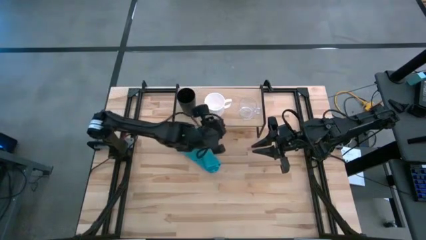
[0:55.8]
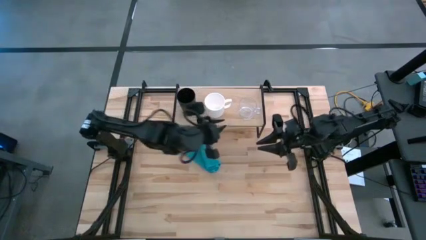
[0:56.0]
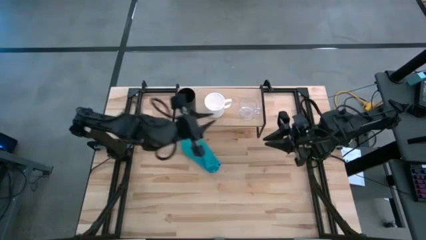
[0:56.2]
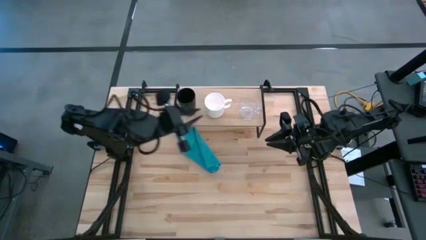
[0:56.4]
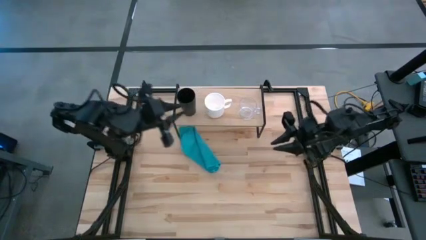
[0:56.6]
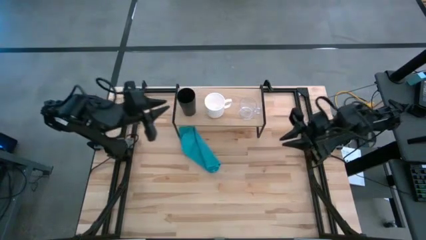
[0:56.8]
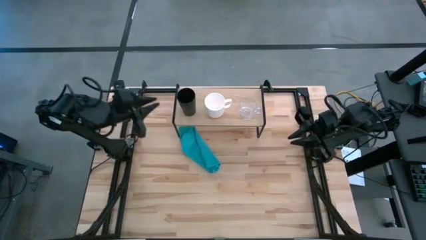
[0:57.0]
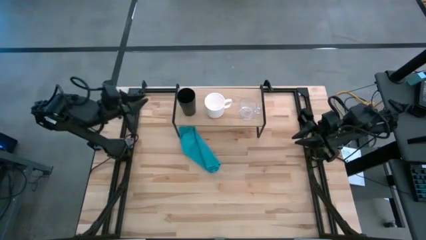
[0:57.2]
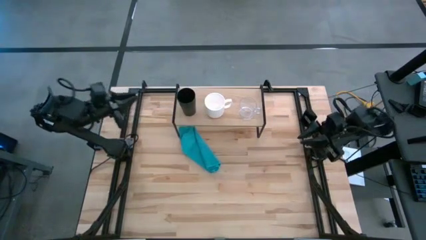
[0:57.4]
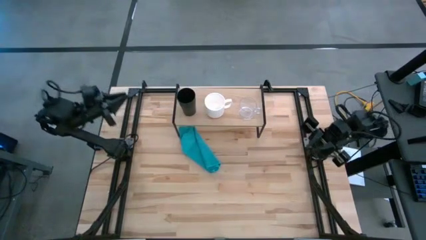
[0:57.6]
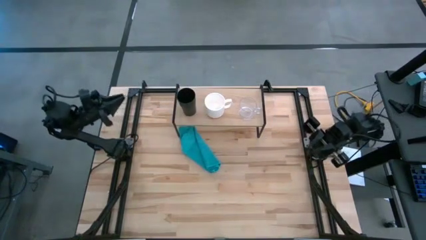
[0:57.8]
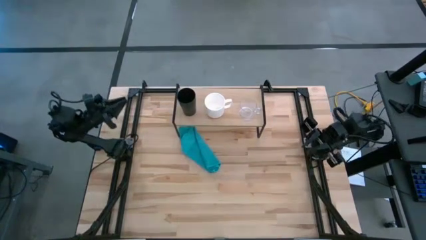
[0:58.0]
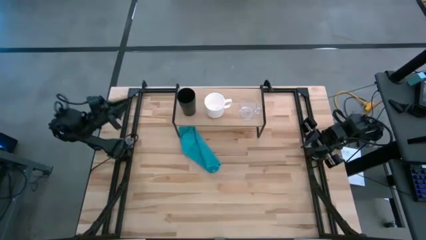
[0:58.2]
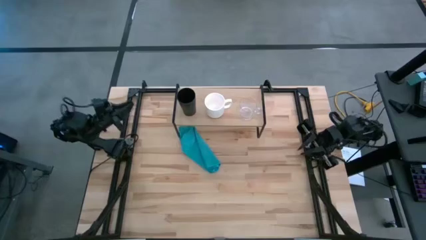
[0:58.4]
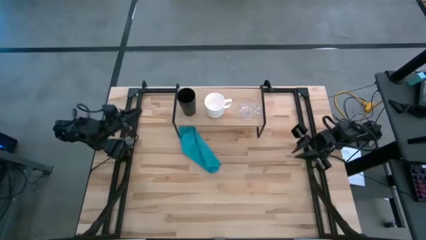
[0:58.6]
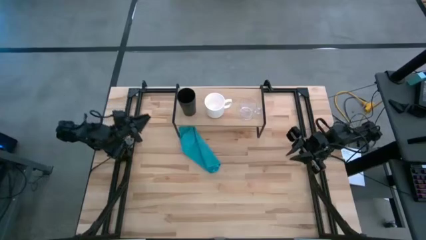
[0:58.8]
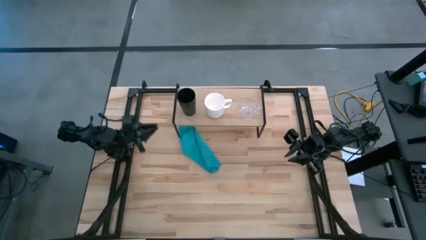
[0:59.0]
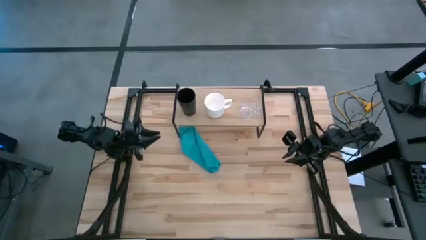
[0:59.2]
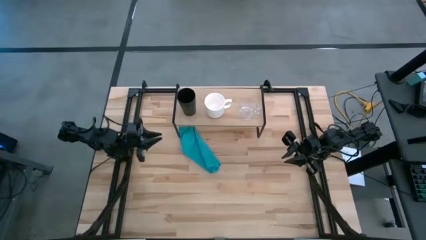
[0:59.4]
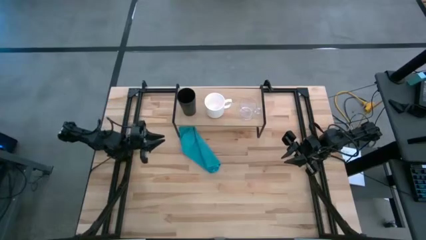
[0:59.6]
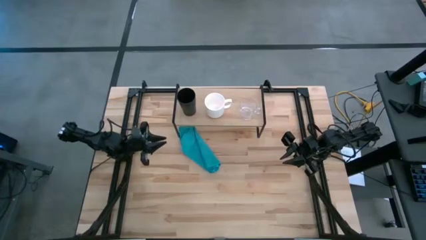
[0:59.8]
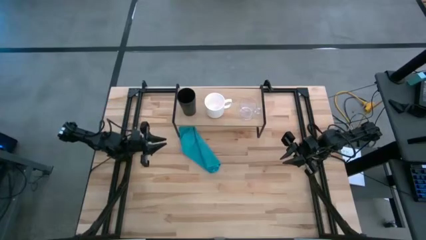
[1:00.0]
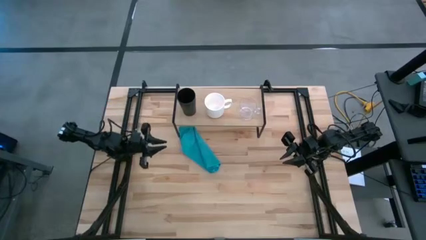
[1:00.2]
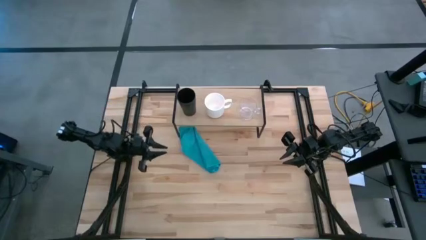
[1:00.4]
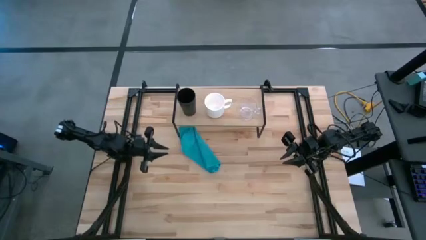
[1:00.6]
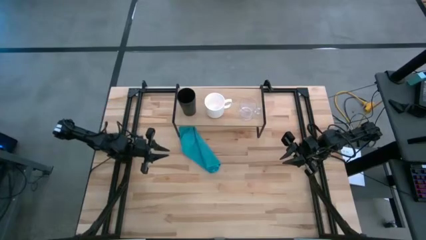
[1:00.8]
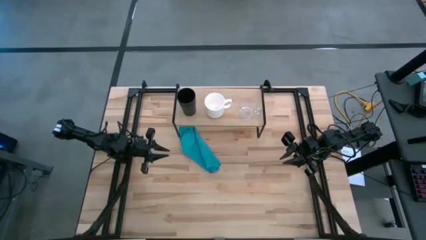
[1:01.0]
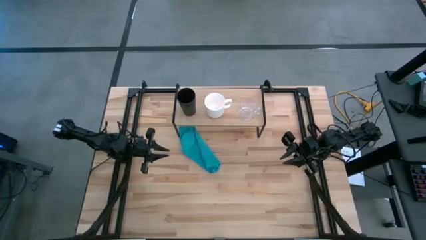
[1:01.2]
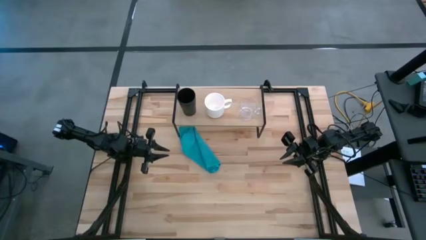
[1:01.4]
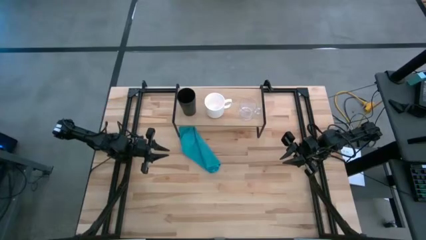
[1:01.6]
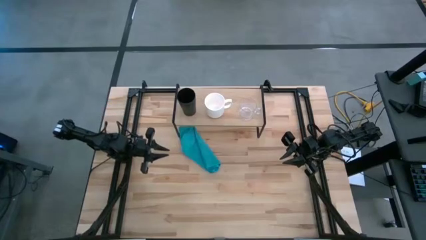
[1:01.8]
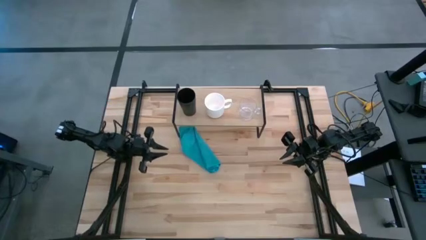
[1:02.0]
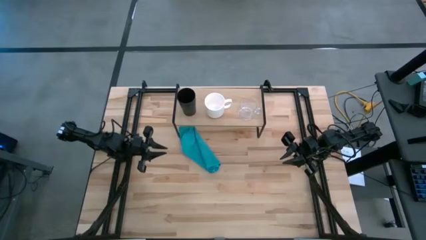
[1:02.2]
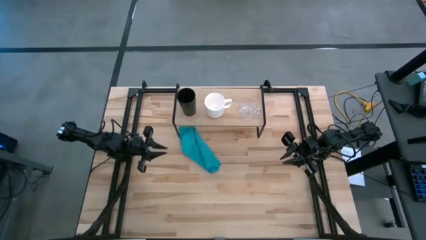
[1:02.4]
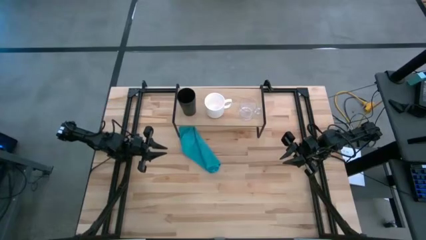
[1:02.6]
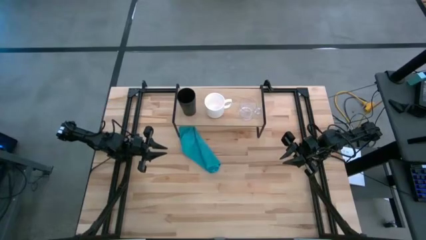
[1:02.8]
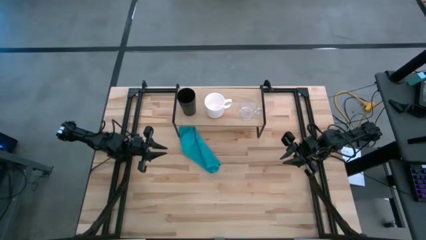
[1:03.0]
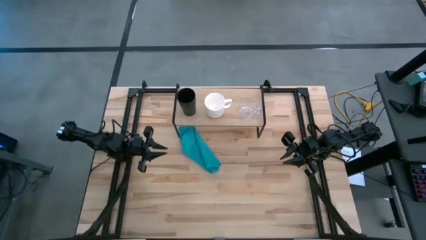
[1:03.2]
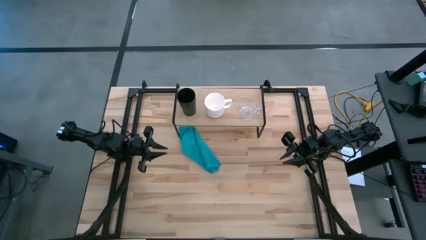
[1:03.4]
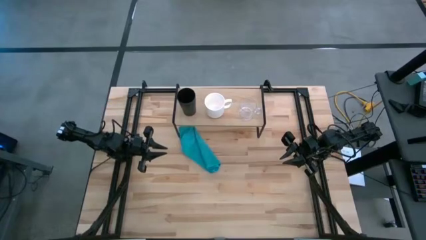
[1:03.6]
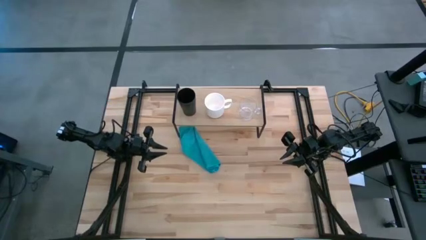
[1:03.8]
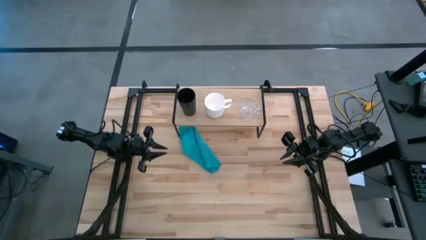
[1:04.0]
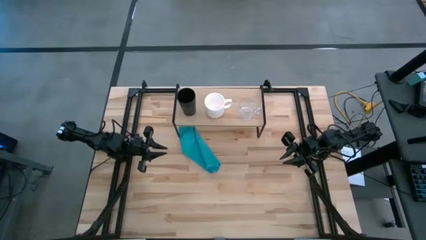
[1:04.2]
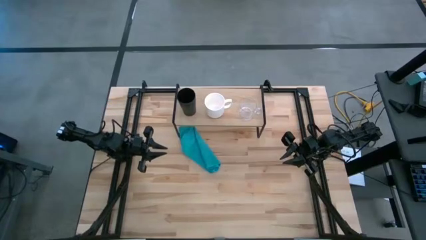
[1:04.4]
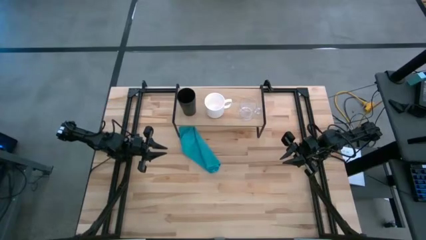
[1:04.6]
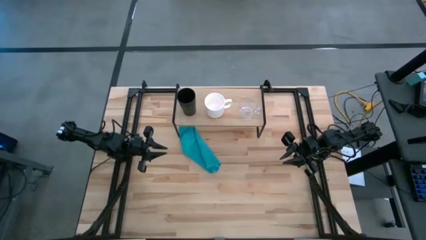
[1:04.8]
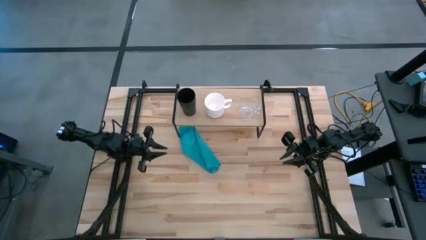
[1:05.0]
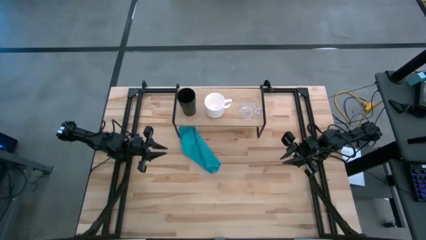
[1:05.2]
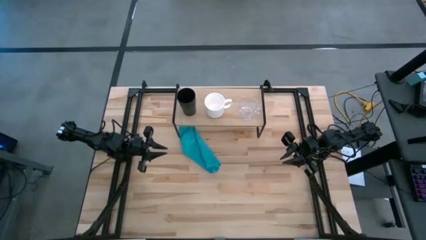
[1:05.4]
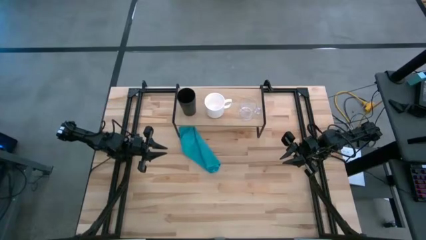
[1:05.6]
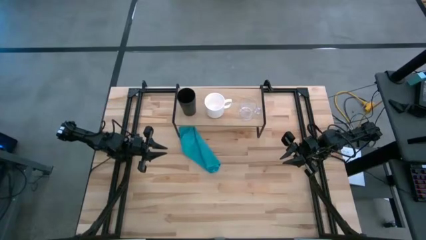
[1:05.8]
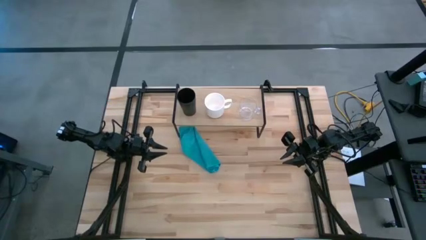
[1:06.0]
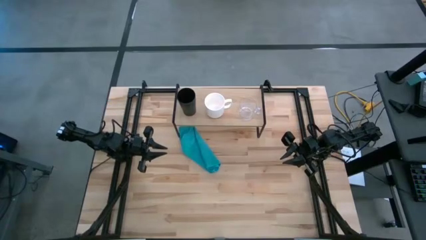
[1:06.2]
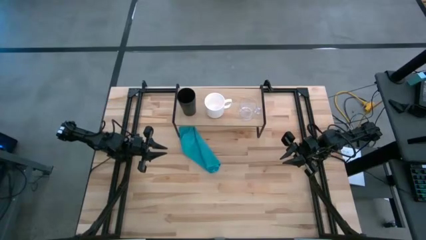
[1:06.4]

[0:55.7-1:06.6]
Task: Stack small to large cups/mugs on shelf
Return to Home Position

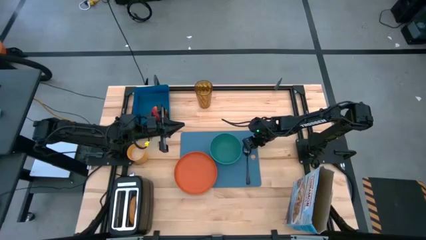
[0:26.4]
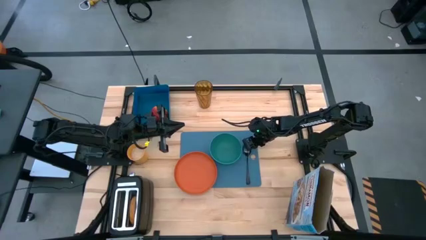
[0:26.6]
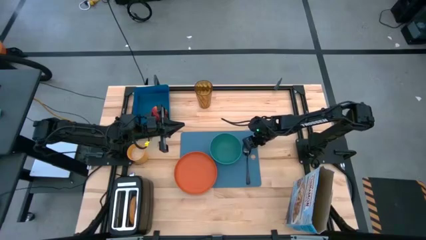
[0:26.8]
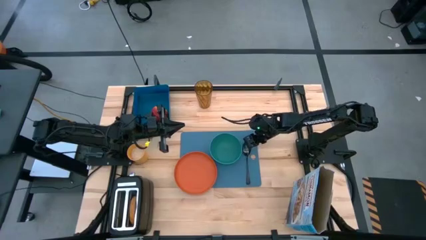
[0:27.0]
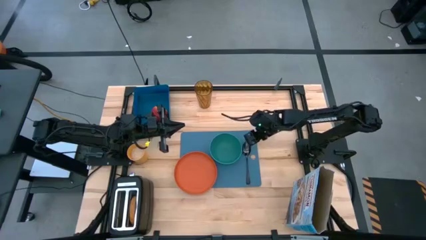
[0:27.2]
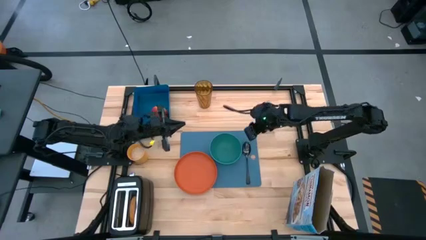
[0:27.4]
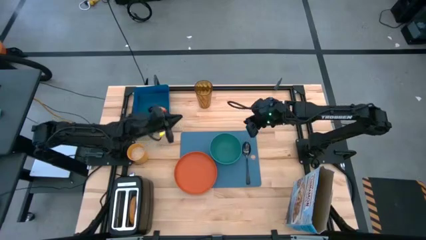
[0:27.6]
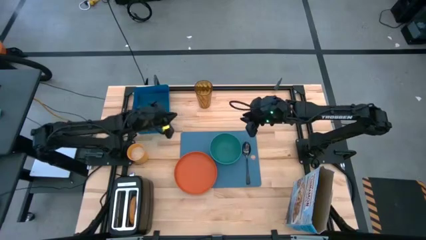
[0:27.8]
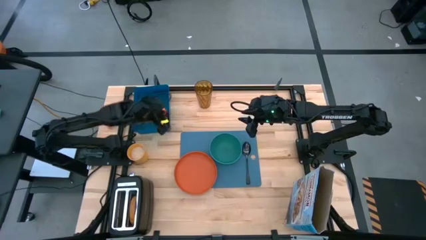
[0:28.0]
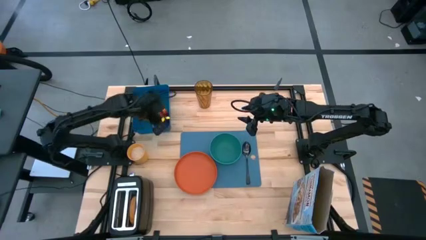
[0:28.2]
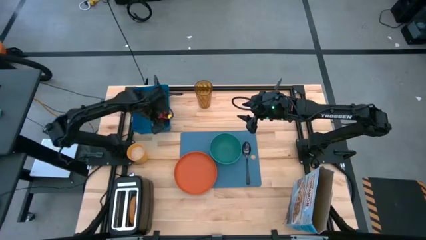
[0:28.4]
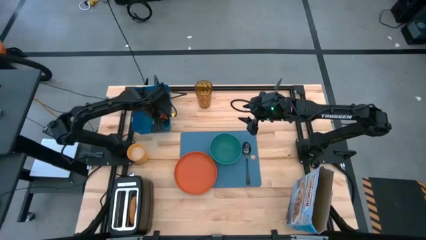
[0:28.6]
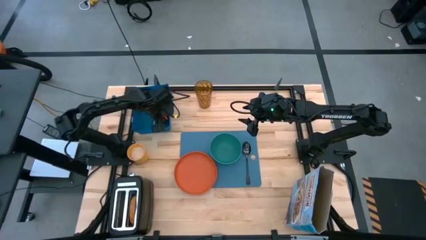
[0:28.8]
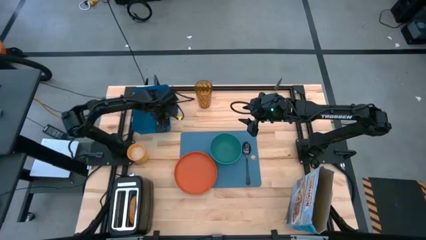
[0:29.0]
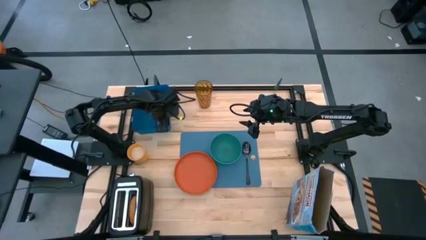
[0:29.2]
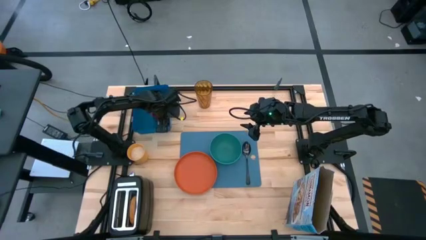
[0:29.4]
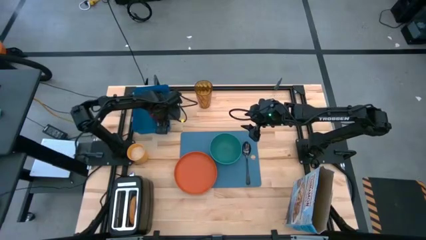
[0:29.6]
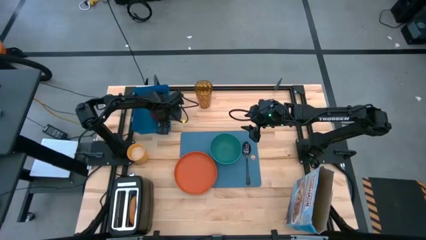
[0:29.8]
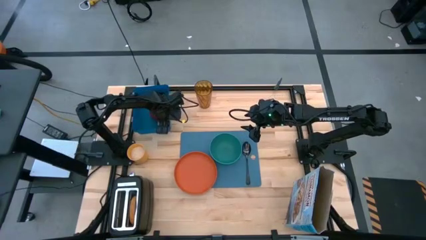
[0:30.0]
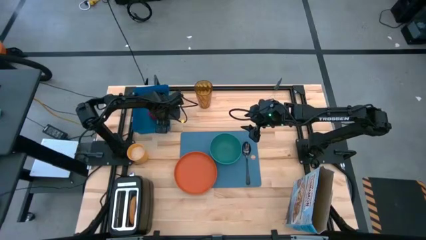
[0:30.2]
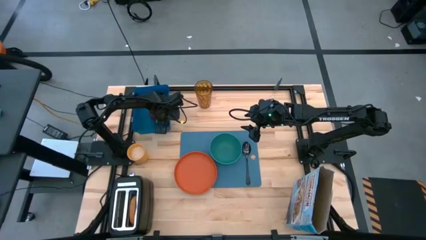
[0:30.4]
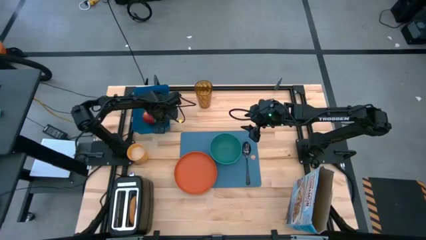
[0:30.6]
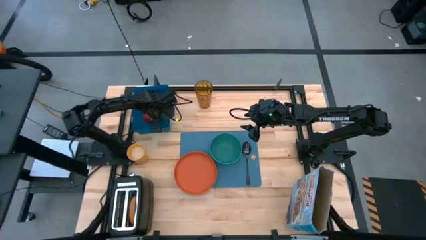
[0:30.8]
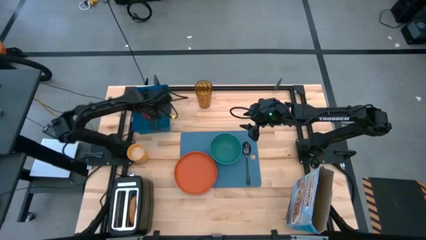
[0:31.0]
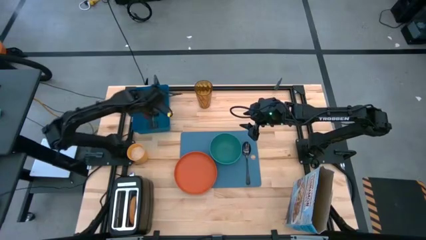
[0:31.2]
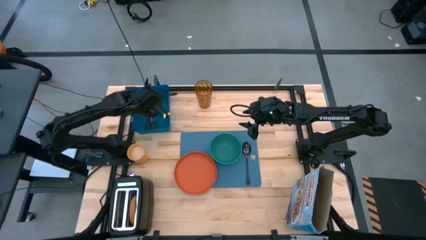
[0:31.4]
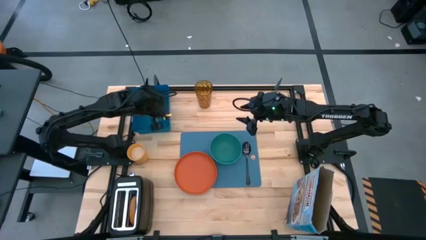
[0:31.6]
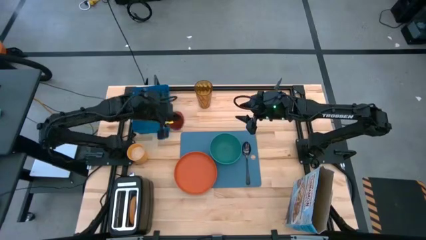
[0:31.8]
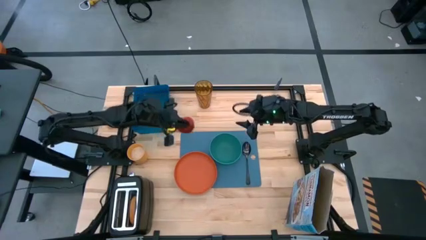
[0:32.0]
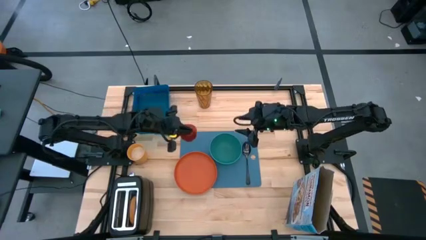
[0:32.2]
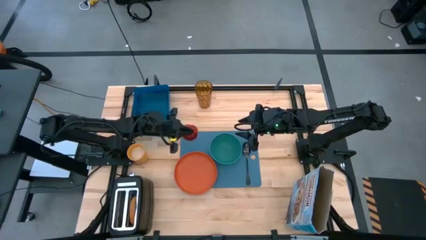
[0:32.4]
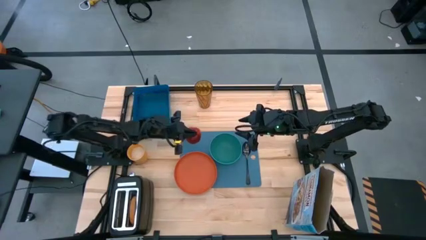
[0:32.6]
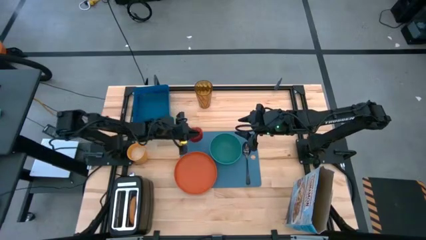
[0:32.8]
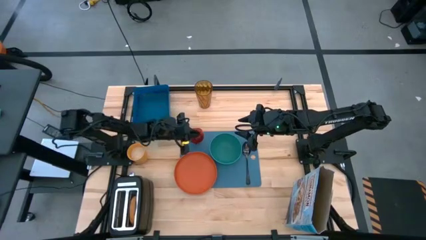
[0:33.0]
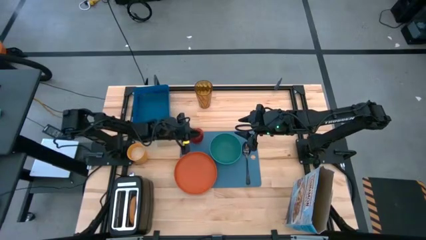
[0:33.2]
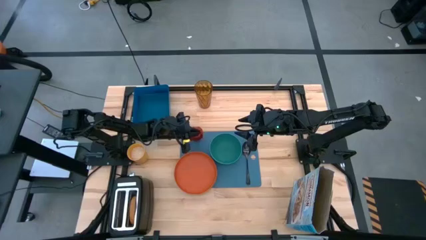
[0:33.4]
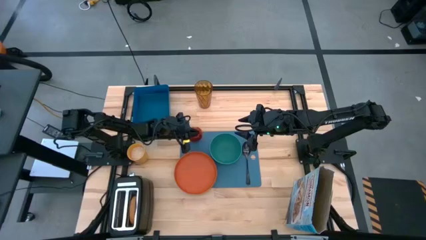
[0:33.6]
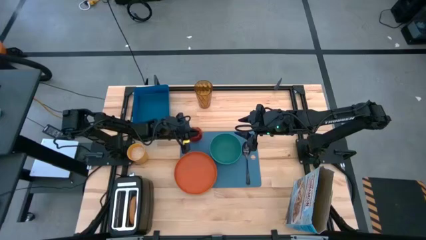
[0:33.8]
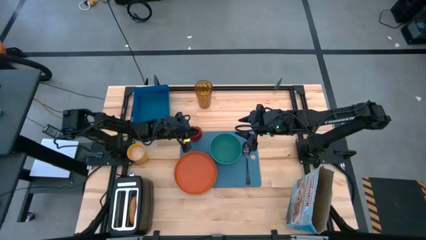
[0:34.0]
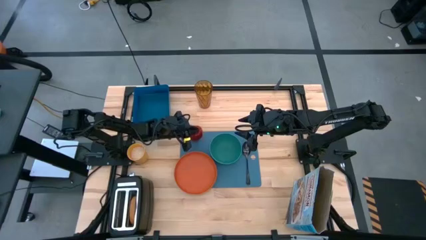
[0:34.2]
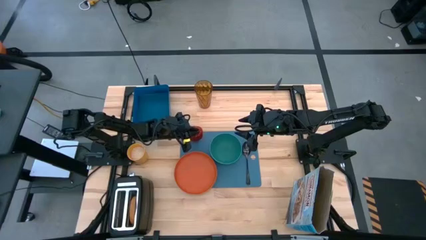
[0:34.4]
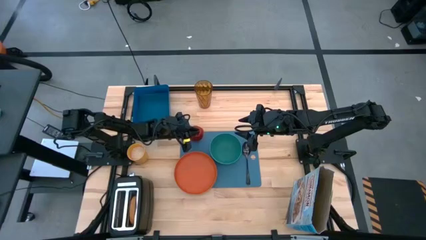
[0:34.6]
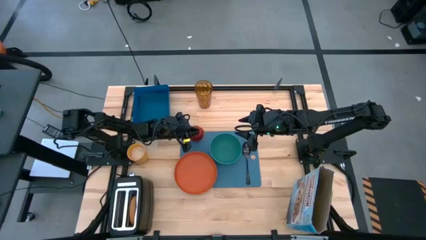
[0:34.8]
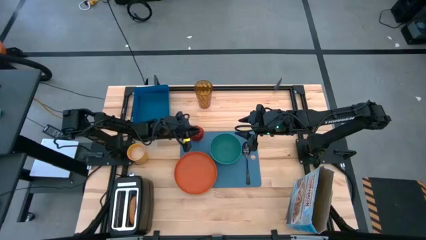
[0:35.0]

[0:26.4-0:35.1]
Task: Arrange a breakfast setting
Put the red apple on the blue cutting board to the top of the orange plate
